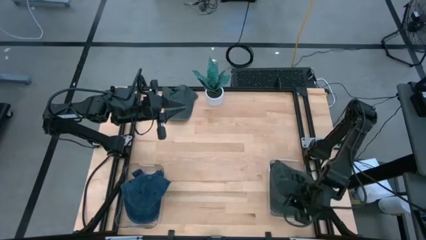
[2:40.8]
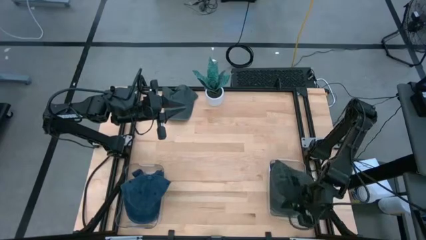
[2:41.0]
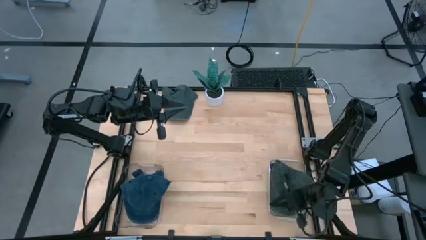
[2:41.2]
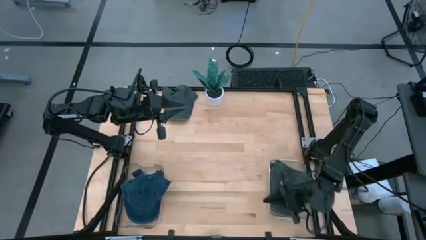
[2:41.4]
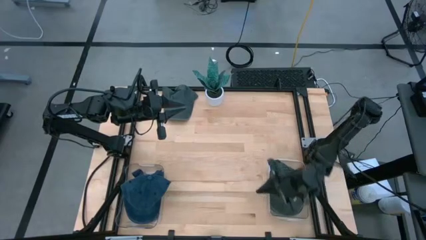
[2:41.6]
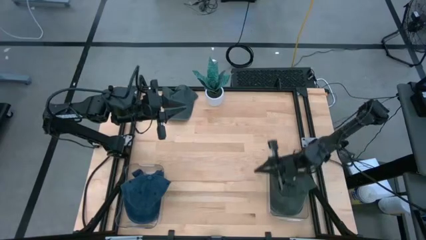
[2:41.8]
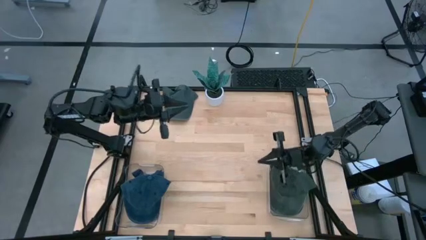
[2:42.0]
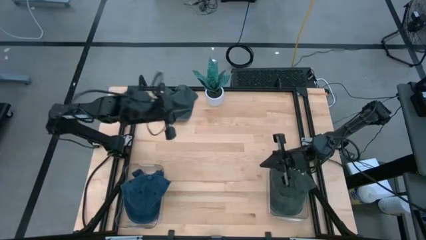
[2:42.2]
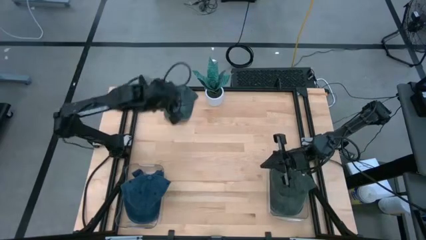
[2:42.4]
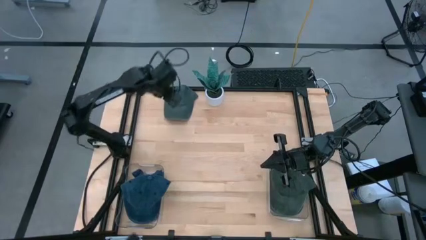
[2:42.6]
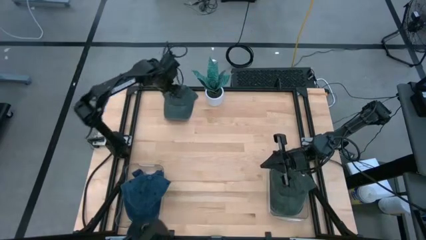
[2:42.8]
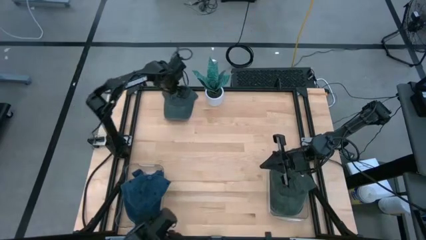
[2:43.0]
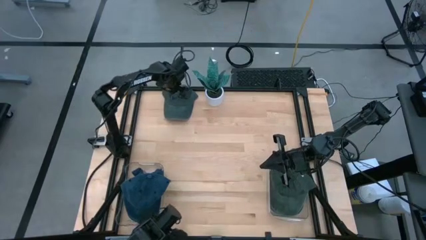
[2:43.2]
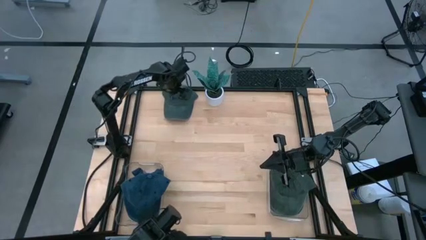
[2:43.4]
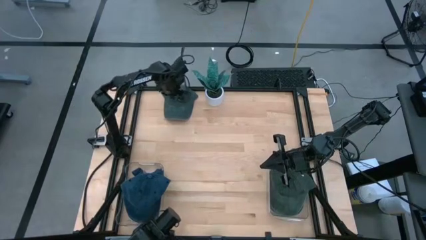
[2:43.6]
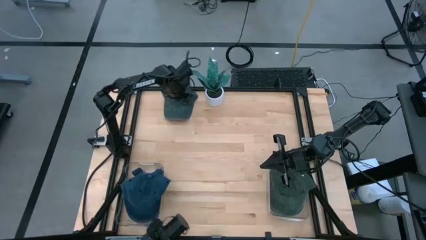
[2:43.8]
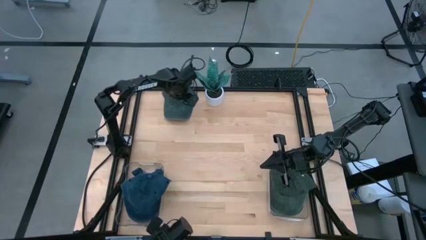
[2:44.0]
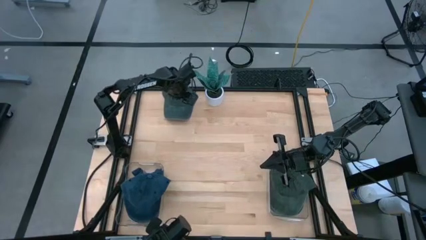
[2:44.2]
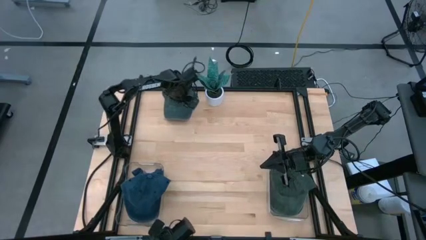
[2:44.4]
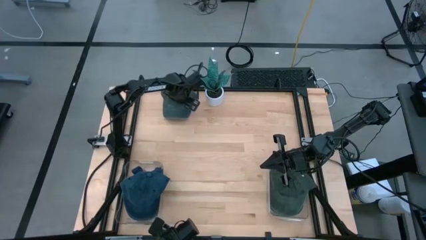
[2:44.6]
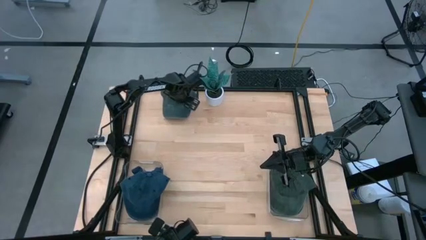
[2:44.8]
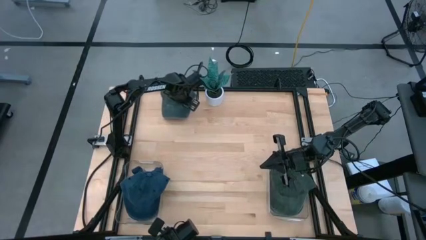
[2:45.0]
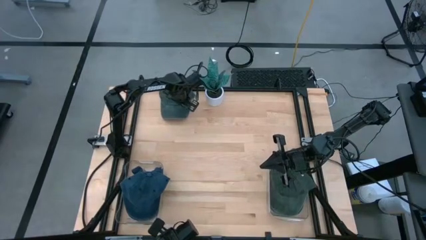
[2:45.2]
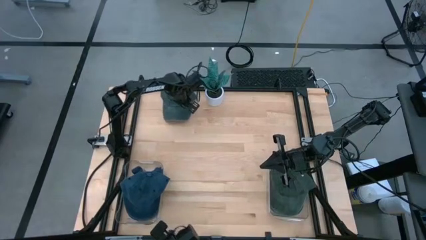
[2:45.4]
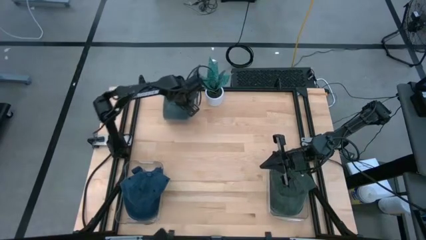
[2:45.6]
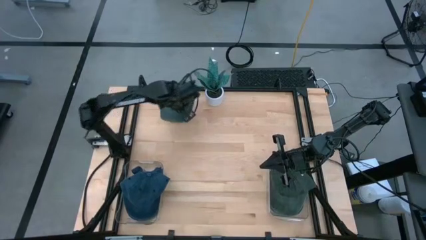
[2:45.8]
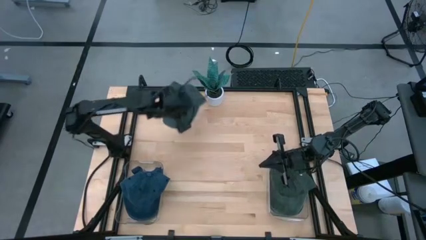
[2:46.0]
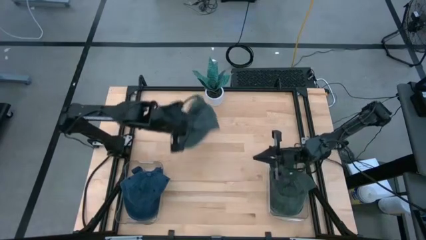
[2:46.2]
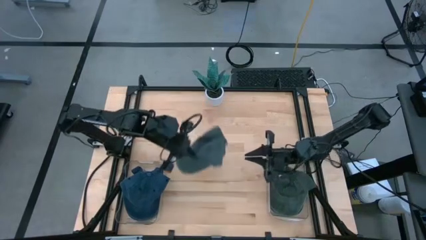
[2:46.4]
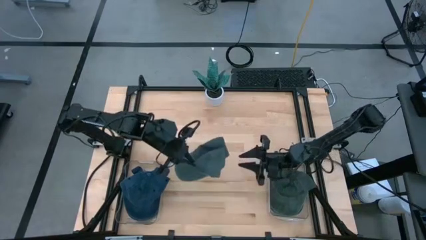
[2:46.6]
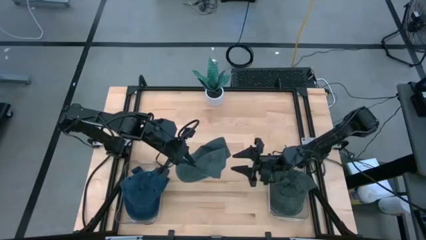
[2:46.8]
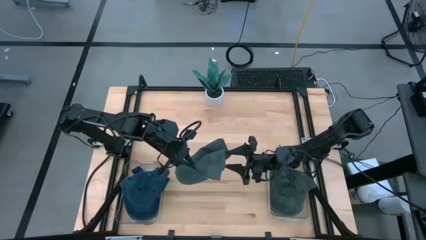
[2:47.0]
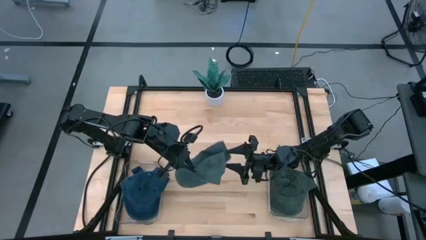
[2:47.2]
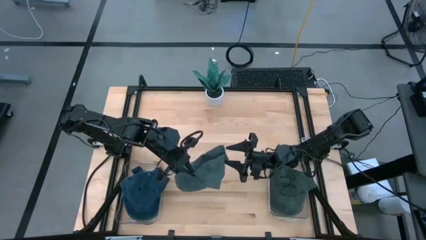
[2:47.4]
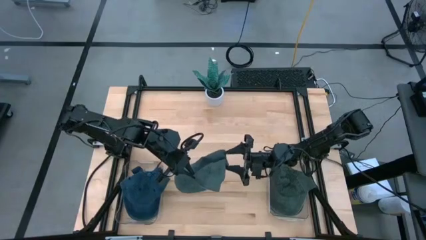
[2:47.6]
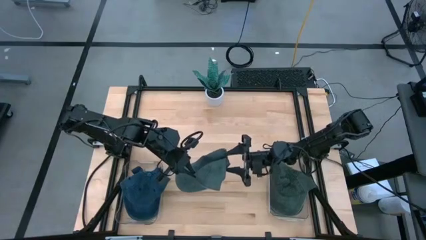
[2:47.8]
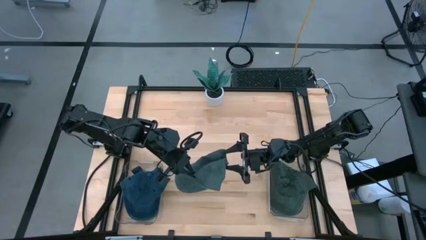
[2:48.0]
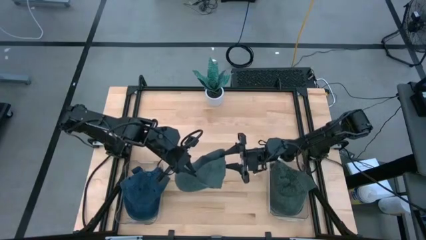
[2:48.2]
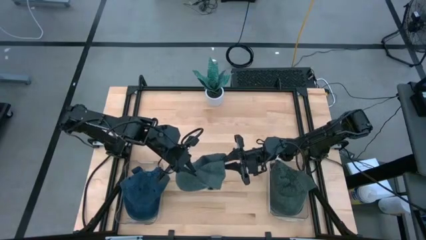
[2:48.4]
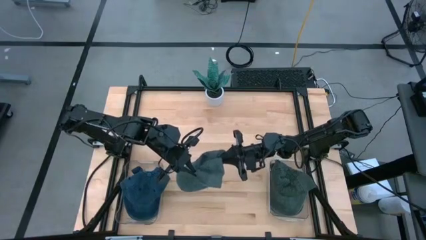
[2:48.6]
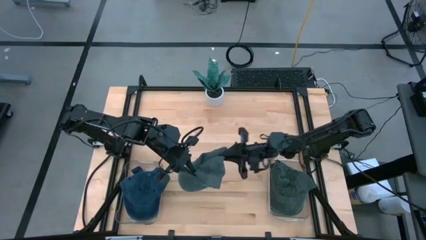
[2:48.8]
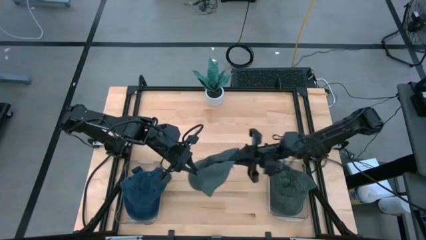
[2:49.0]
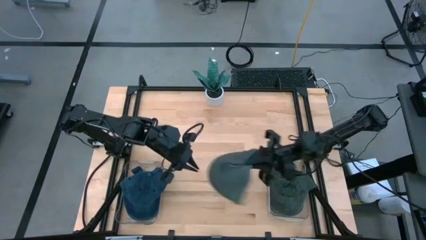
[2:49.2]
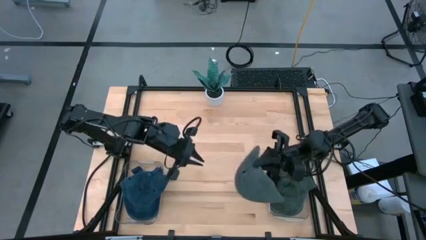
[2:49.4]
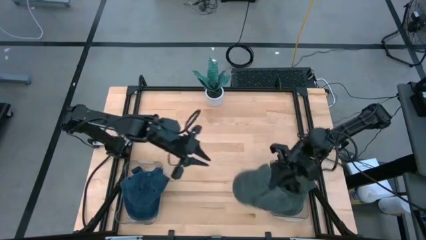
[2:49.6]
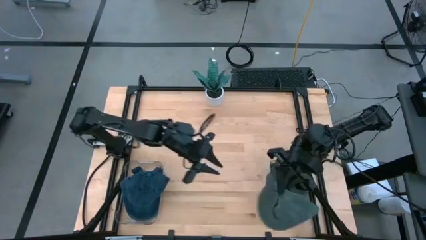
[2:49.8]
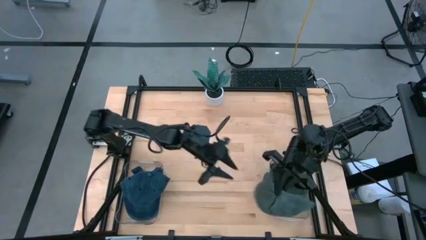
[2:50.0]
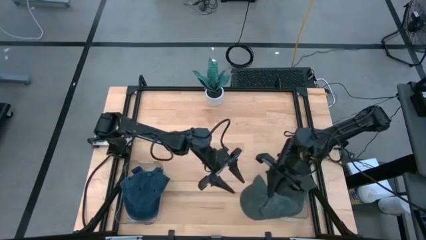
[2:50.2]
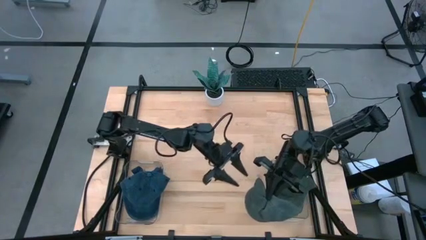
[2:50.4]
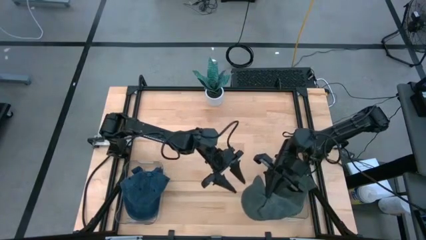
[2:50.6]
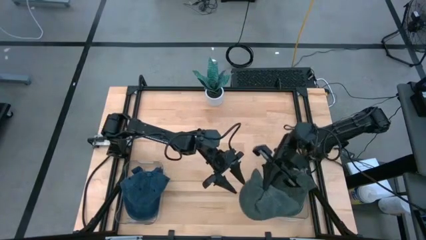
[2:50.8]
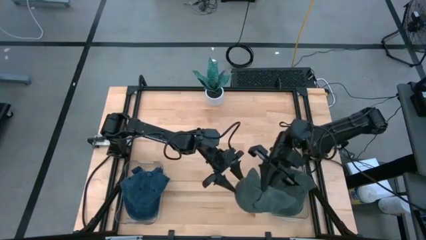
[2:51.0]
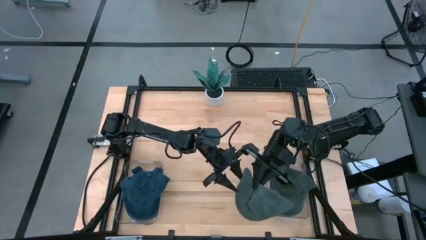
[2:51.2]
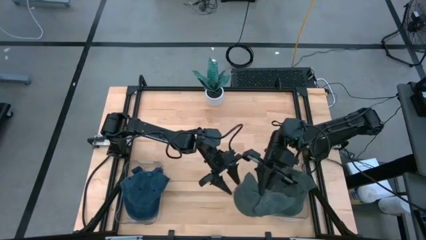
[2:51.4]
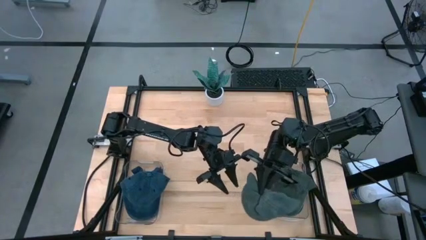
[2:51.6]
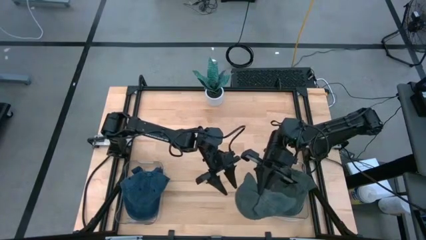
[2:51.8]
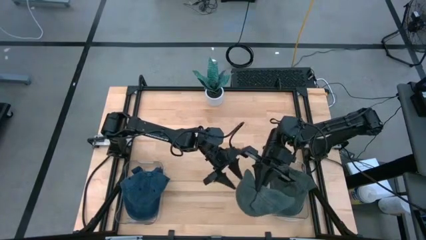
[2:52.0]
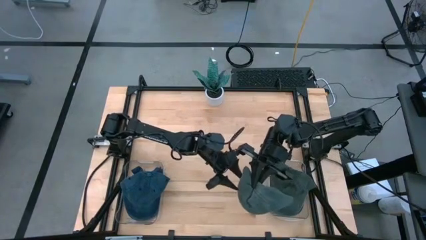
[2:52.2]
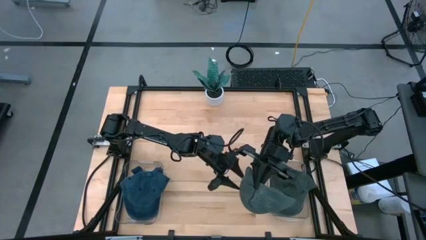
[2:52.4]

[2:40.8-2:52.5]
Task: Pick & Place hat
Put the gray cap into the right transparent bin

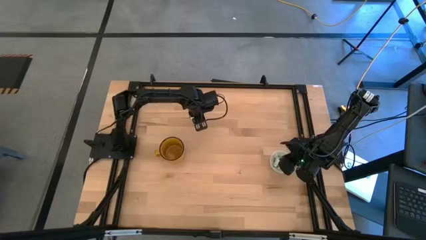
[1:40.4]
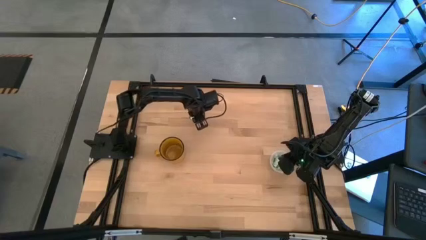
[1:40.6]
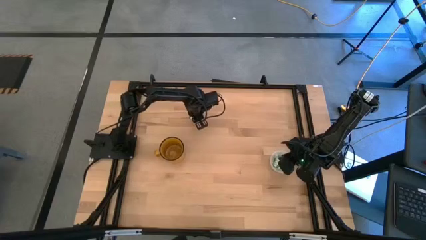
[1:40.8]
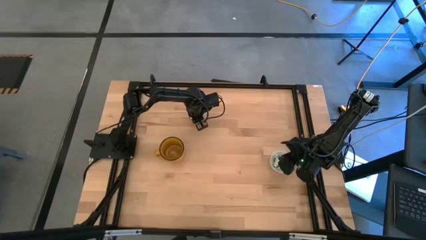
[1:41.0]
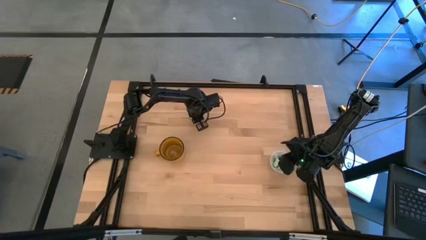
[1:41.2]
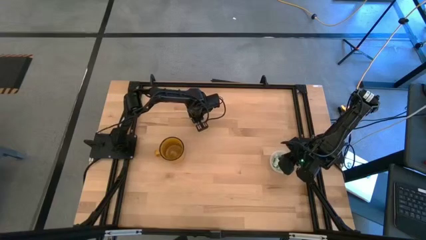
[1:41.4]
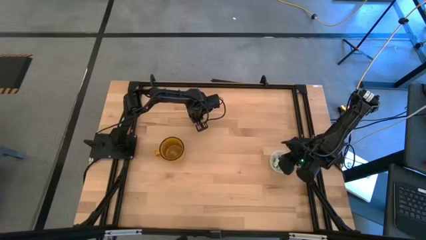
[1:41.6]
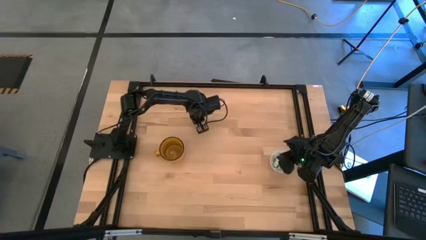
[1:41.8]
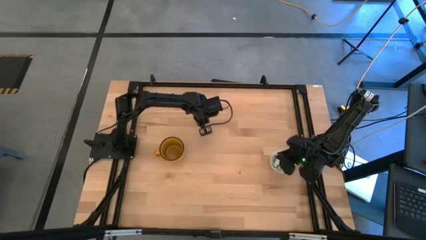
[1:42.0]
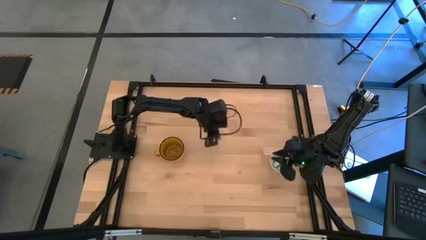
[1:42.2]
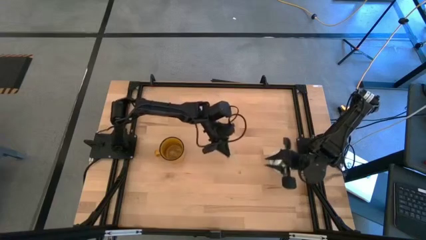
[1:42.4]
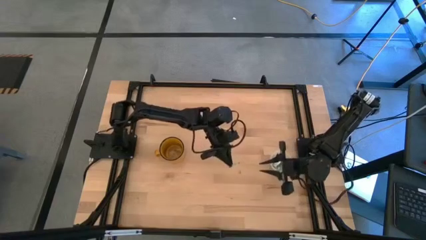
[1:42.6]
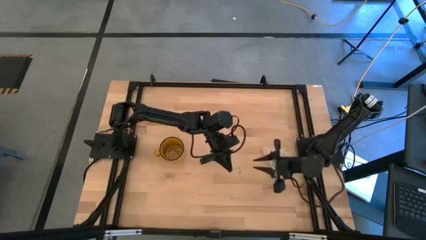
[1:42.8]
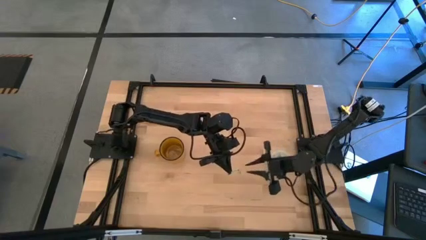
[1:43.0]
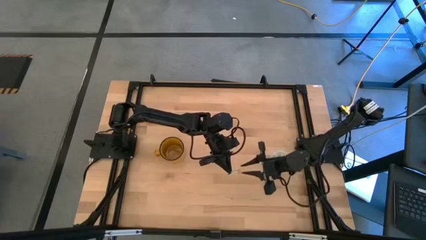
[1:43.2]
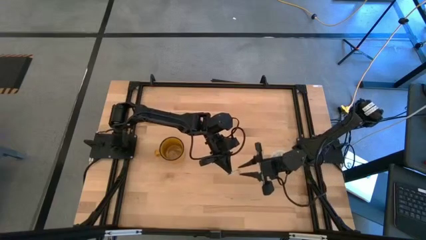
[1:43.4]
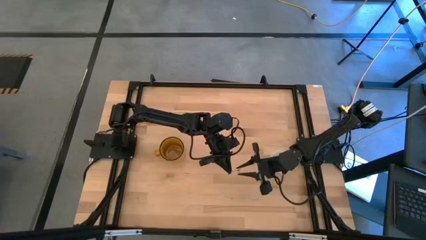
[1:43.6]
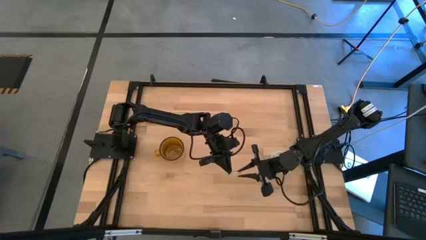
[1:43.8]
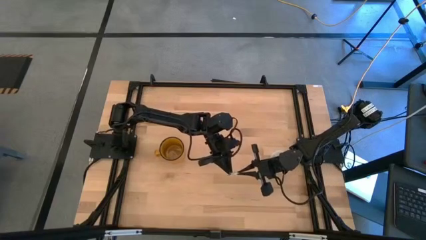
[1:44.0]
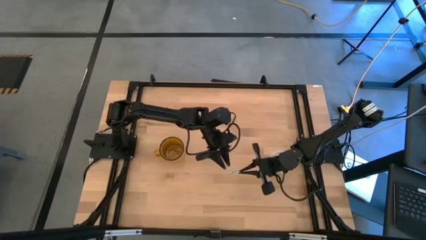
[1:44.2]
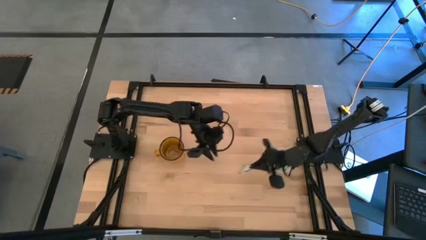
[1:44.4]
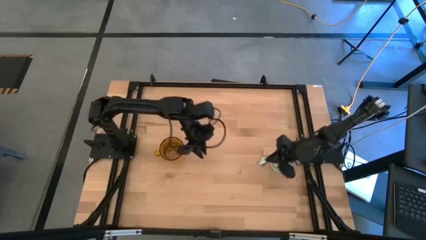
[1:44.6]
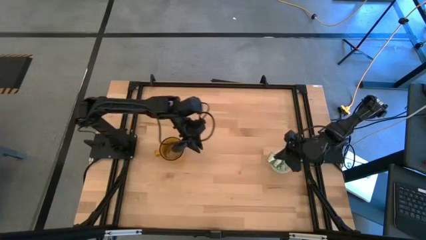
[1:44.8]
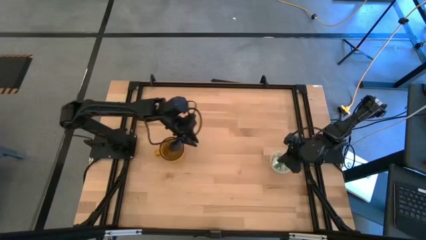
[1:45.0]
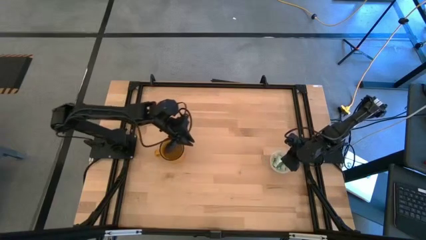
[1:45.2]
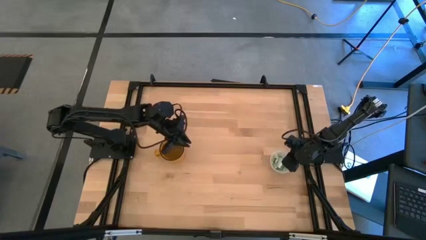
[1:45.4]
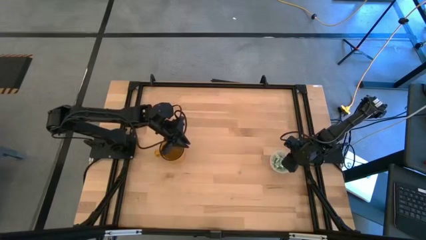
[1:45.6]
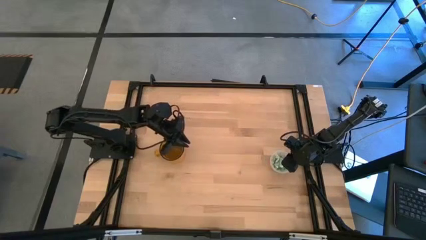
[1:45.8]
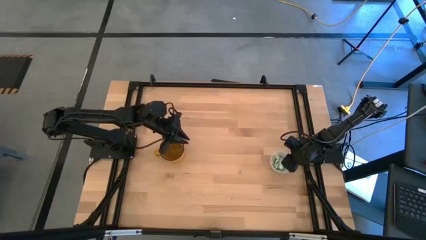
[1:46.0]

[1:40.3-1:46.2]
Task: Pick and place Stevia / Truvia into bins
Put the green stevia packet into the transparent container
